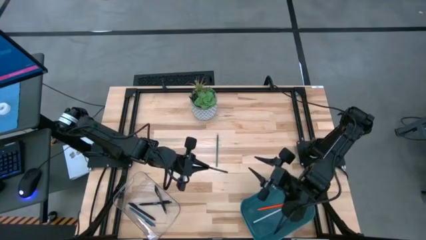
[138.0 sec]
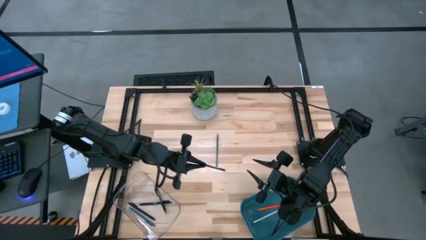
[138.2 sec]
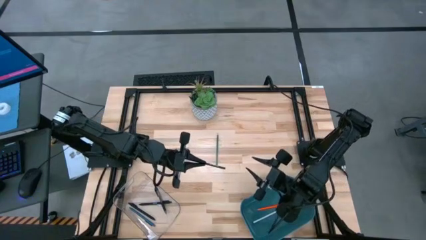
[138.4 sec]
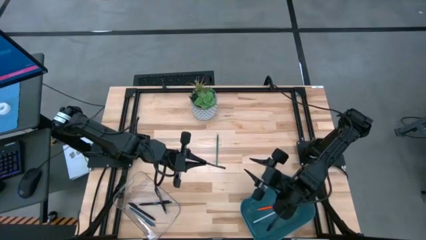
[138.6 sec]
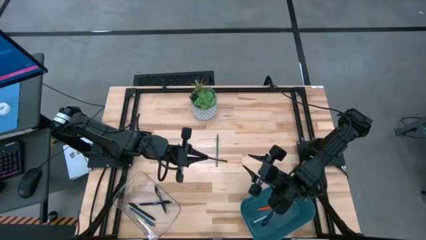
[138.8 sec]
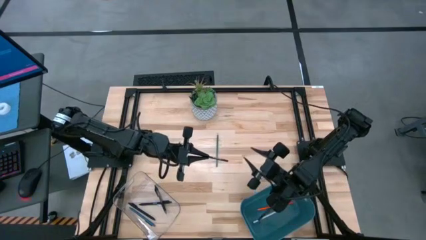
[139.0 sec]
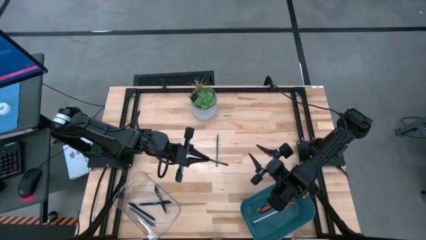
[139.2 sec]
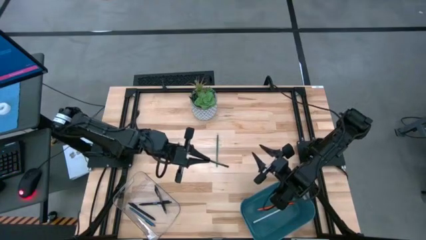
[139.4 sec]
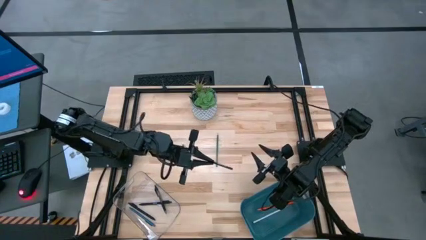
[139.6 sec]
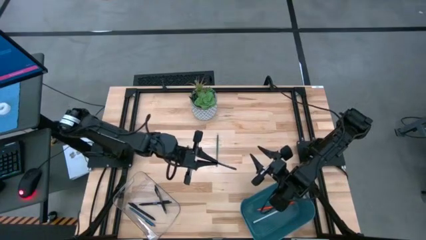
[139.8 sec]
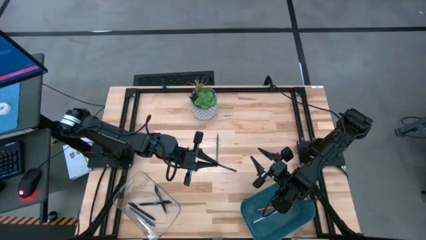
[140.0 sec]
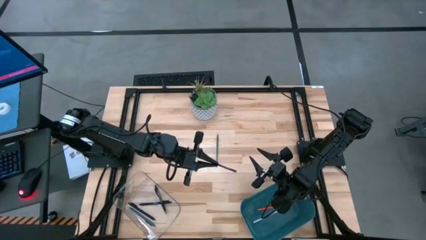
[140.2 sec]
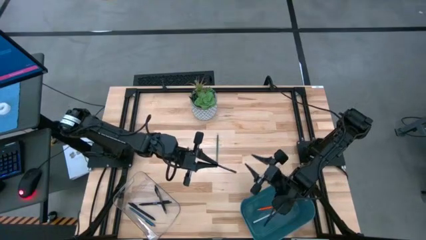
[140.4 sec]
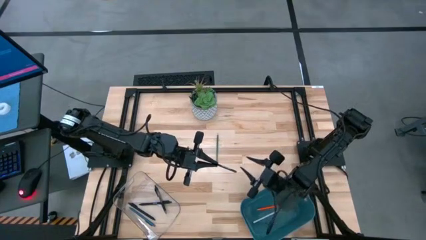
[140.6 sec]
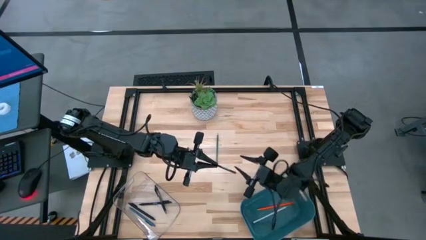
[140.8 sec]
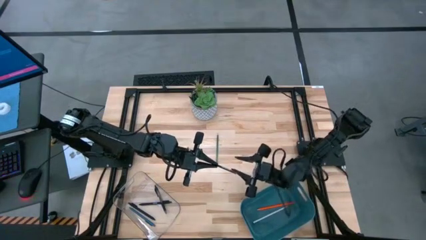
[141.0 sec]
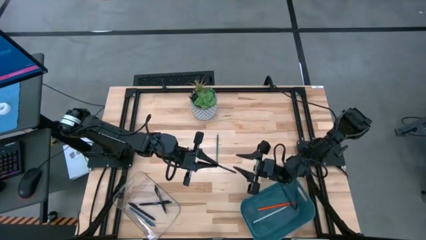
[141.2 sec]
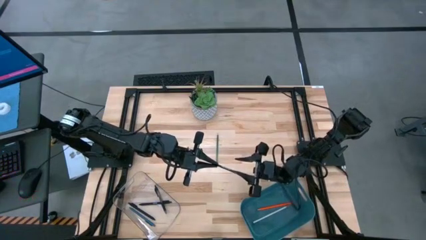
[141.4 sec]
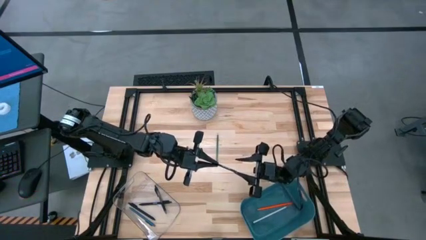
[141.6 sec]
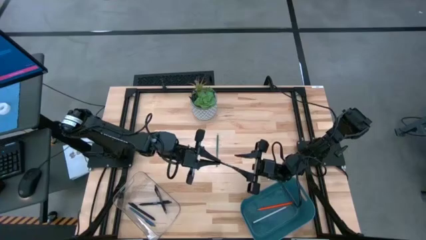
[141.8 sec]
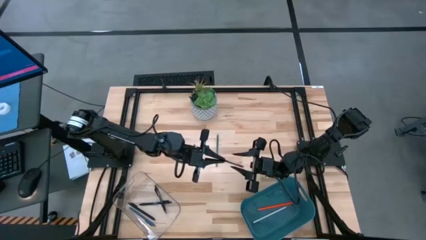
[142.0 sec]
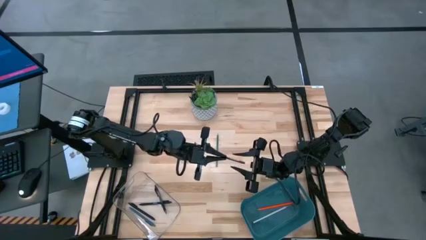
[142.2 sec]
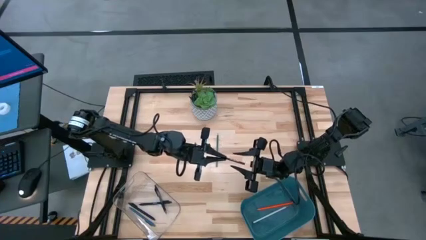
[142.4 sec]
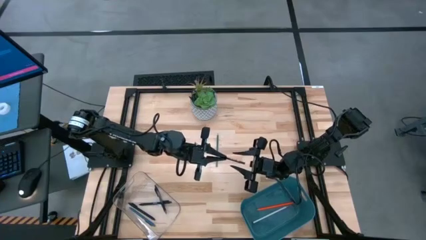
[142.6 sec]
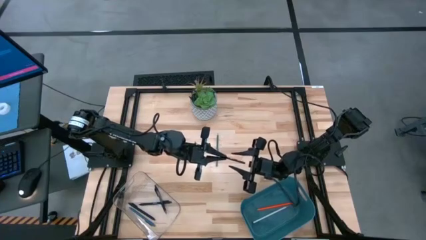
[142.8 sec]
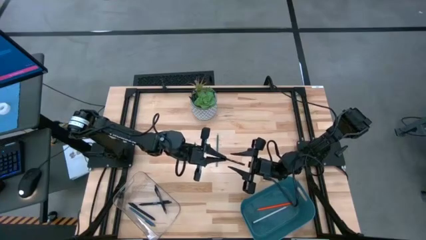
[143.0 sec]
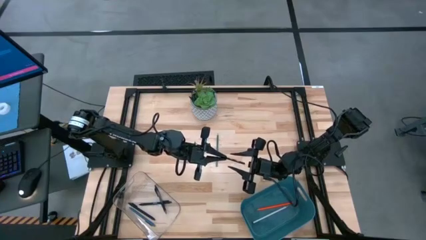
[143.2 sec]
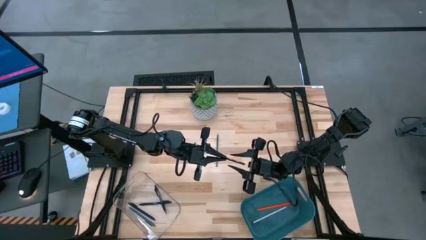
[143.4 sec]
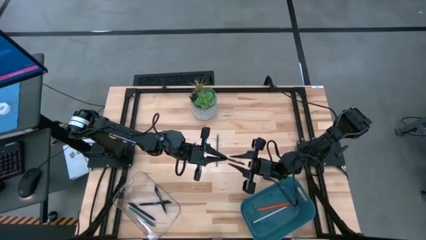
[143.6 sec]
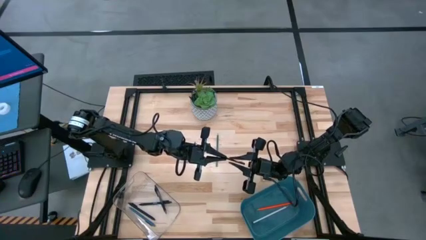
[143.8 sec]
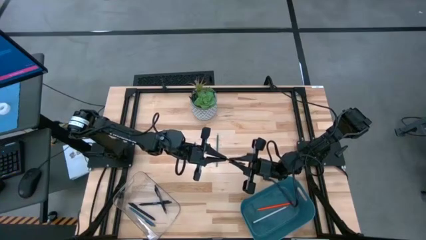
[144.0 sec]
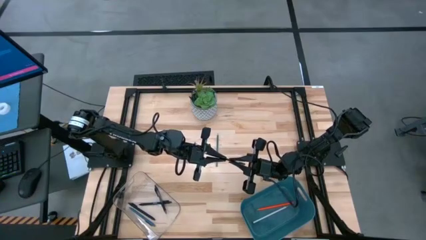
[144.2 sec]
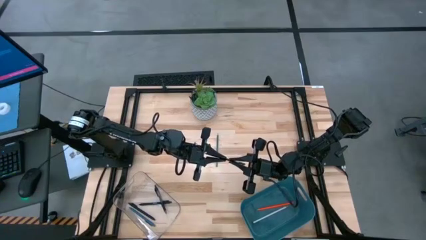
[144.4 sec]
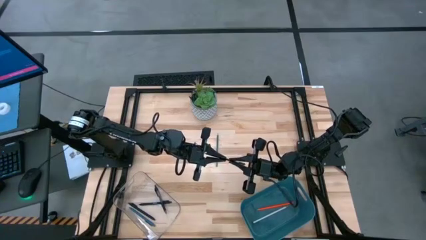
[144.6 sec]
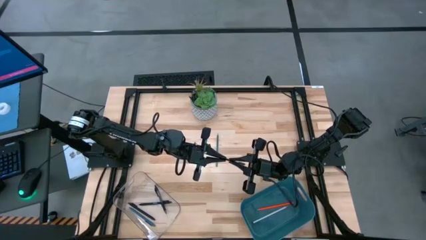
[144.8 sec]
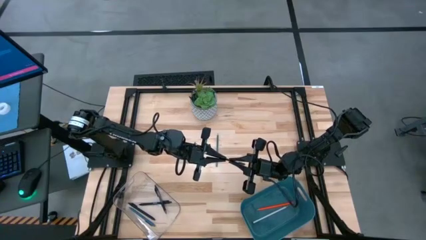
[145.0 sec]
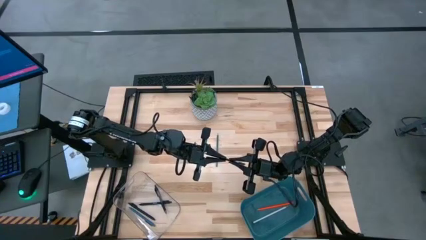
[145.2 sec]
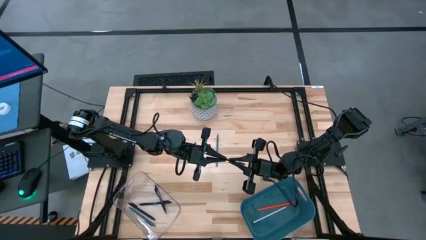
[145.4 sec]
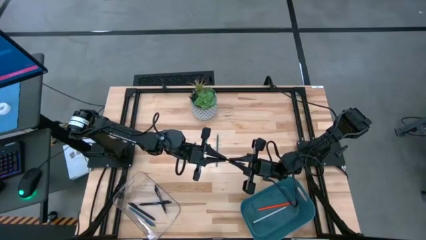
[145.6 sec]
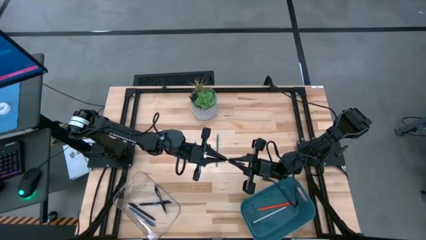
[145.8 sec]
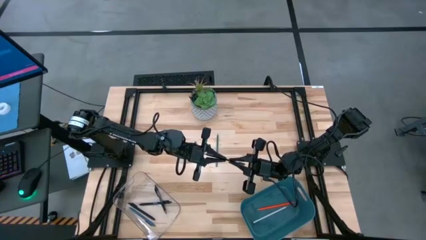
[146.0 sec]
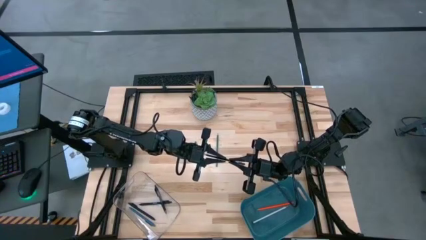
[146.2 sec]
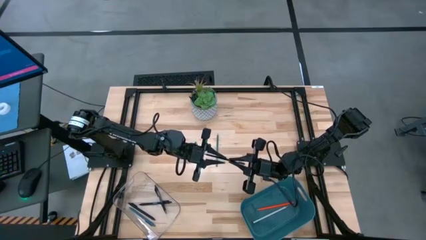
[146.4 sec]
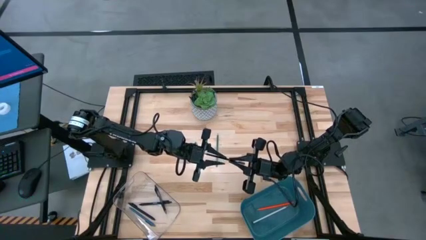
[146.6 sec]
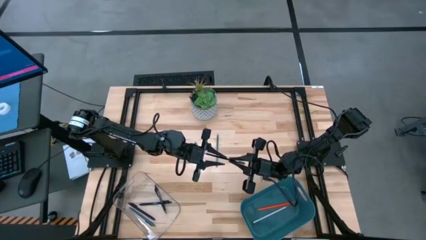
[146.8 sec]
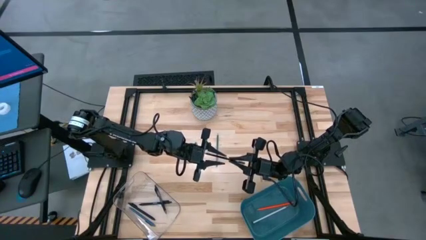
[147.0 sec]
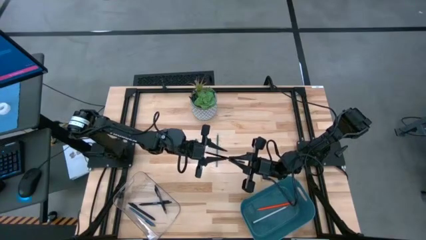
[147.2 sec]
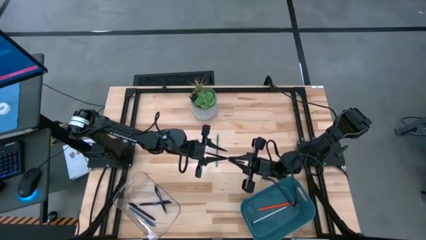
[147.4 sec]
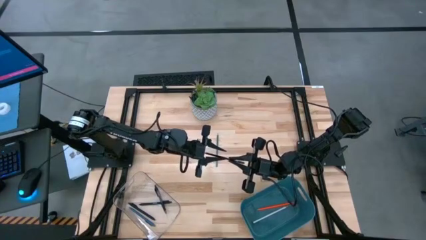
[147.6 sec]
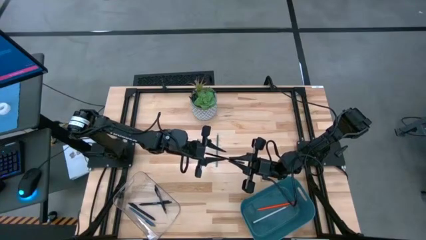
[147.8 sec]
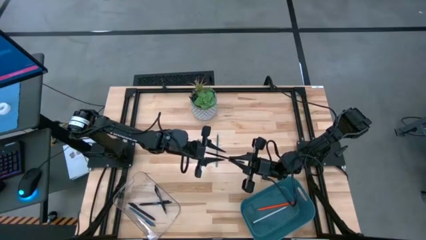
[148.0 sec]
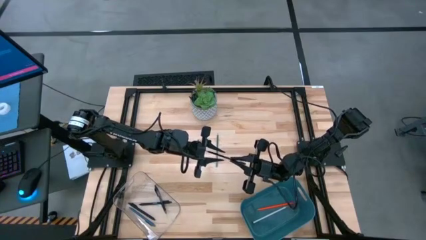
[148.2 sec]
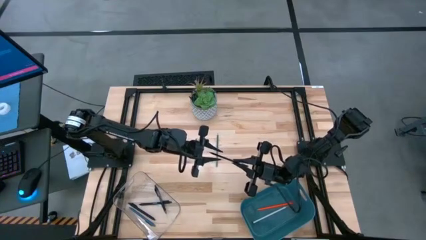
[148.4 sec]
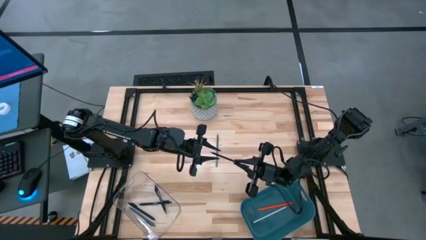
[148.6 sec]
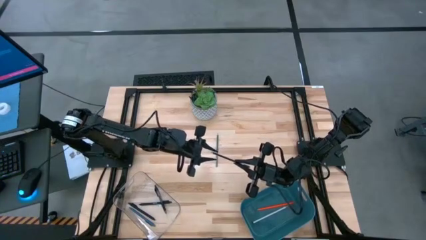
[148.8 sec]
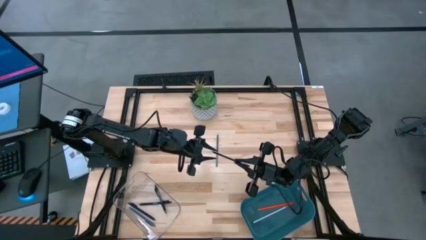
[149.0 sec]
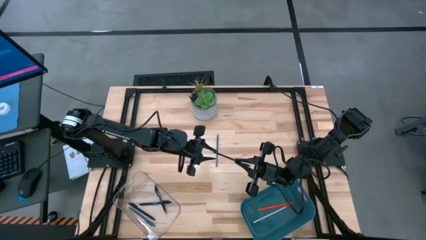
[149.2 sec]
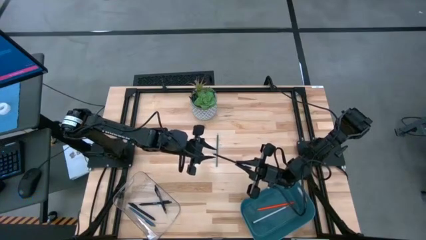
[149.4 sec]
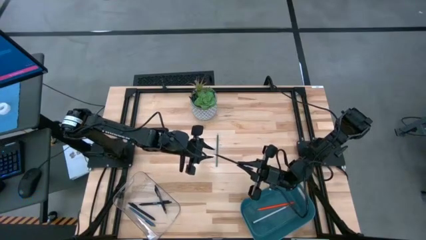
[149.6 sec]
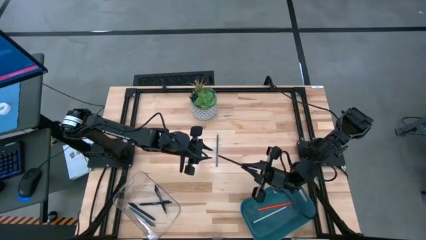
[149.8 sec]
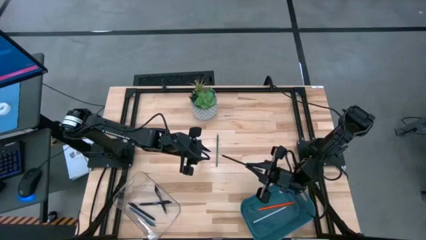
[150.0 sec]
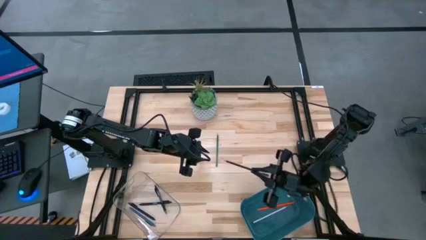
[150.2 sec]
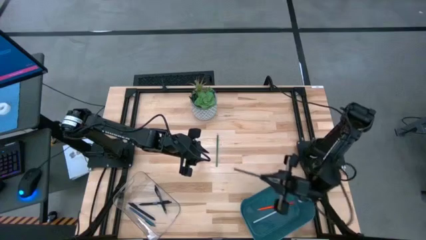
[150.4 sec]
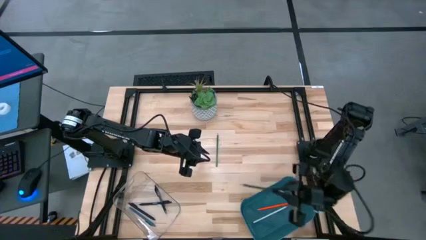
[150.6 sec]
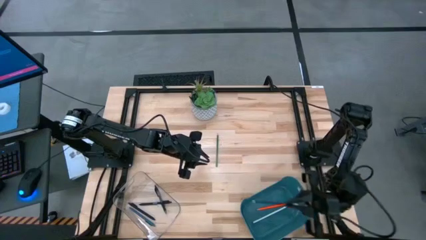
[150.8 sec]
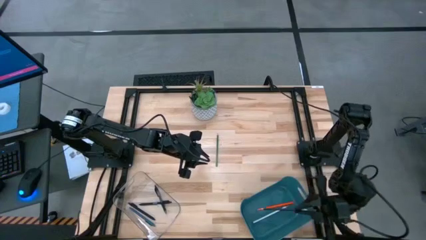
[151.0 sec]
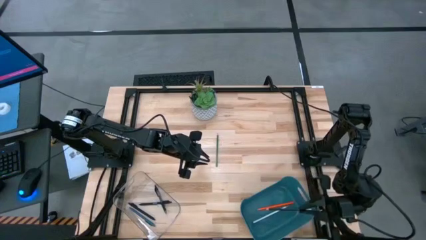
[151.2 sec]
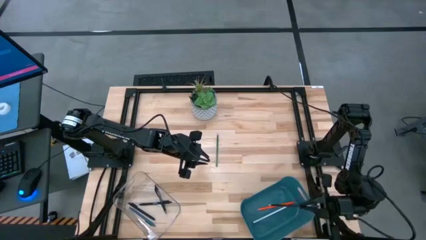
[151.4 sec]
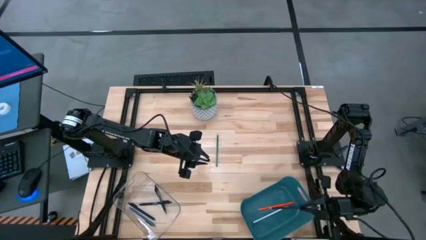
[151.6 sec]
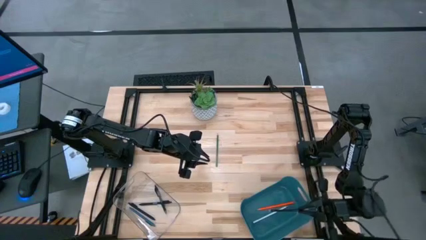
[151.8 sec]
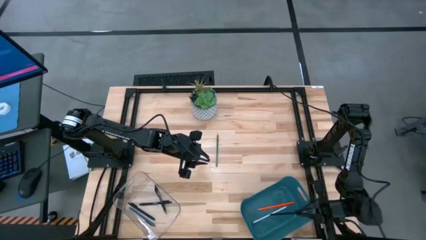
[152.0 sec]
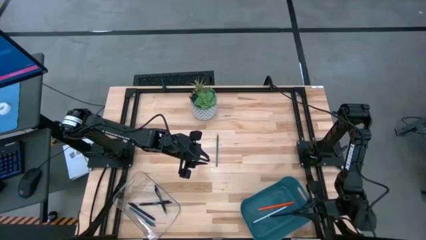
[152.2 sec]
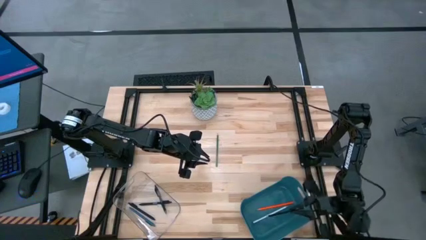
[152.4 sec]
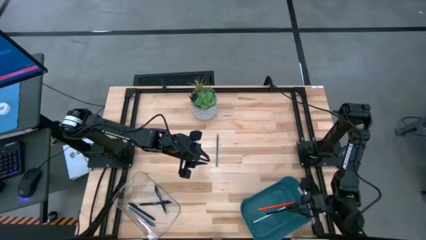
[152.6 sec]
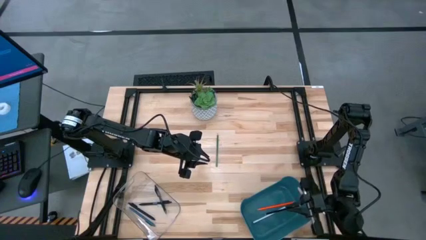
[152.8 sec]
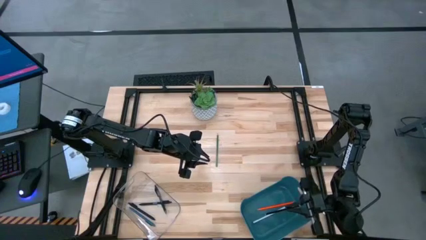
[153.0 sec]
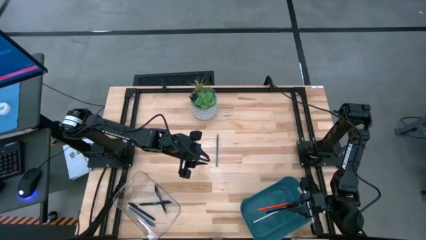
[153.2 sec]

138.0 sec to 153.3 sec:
Task: Sort pens & pencils
Put the black pencil into the blue bin
